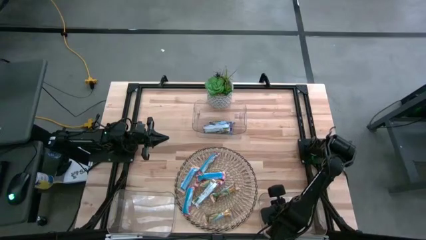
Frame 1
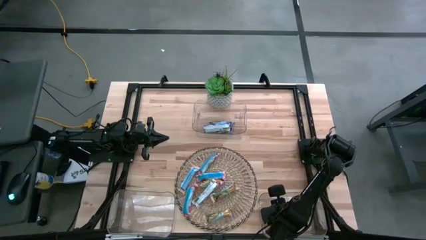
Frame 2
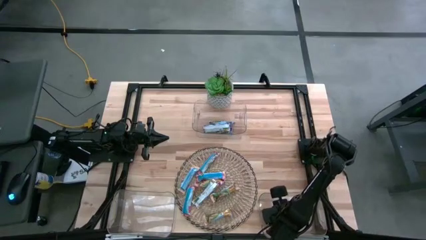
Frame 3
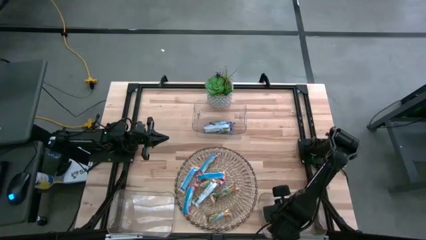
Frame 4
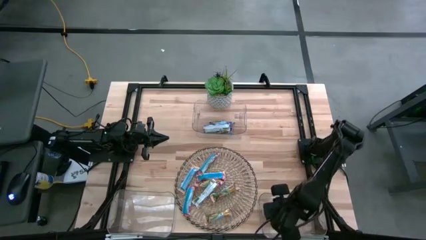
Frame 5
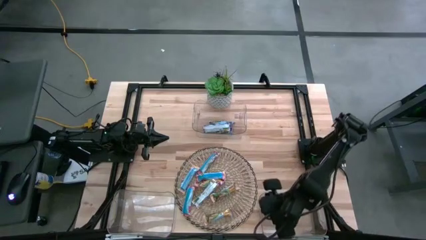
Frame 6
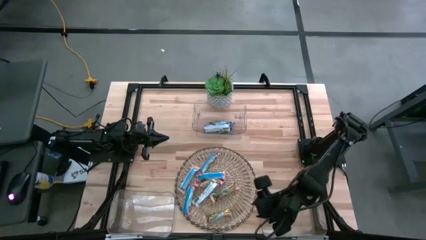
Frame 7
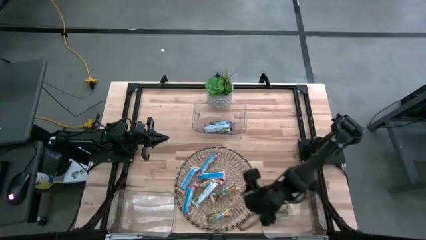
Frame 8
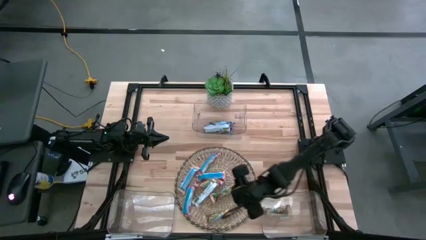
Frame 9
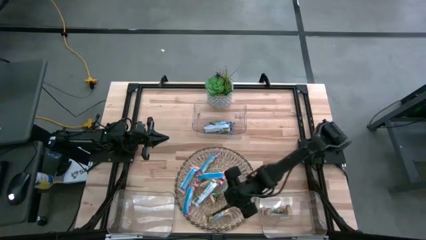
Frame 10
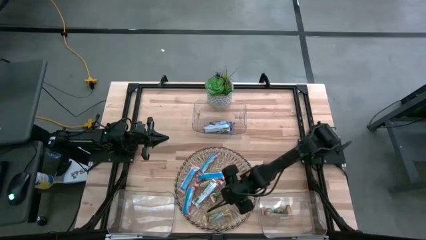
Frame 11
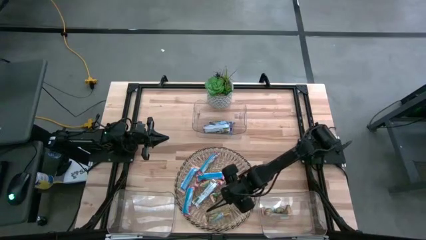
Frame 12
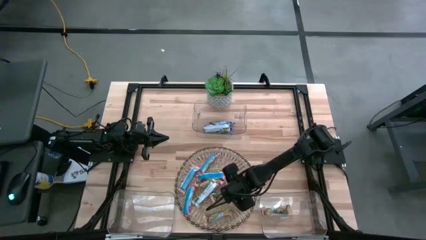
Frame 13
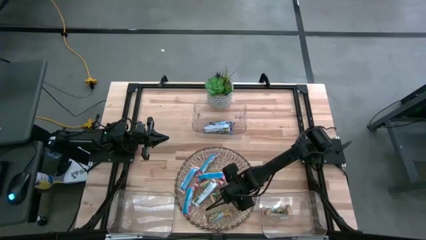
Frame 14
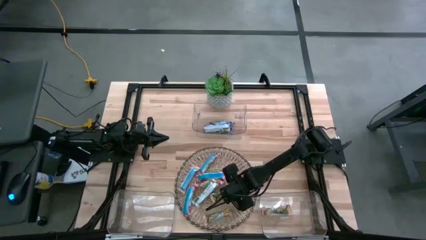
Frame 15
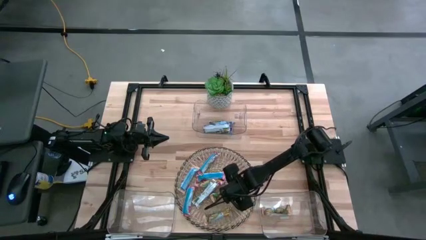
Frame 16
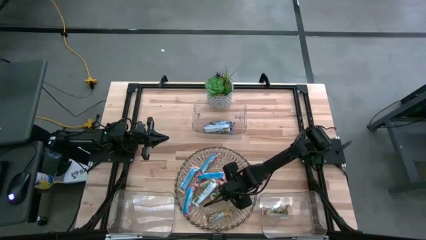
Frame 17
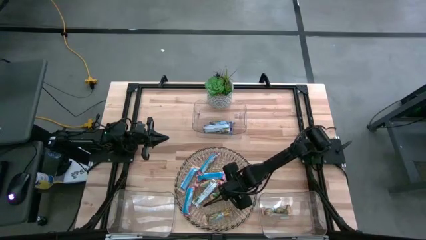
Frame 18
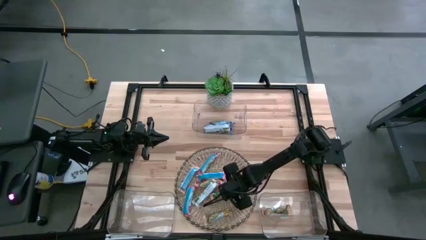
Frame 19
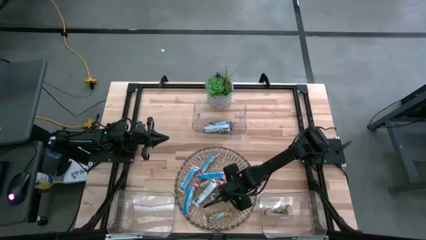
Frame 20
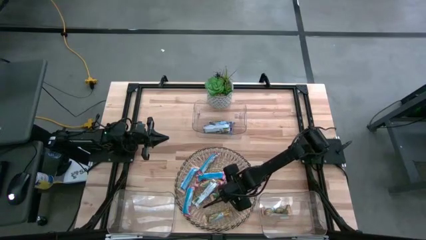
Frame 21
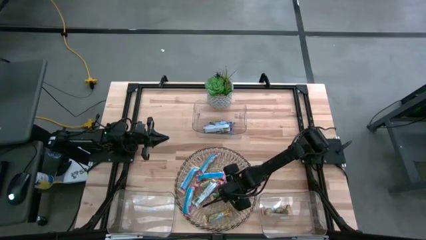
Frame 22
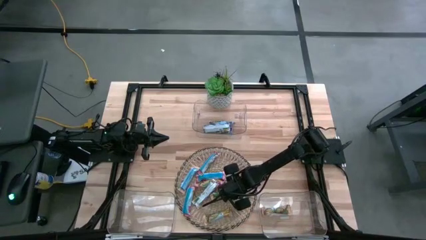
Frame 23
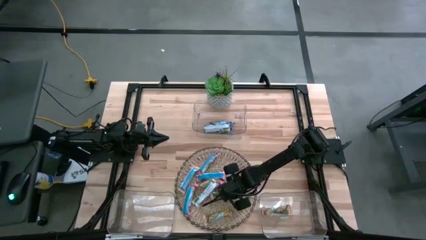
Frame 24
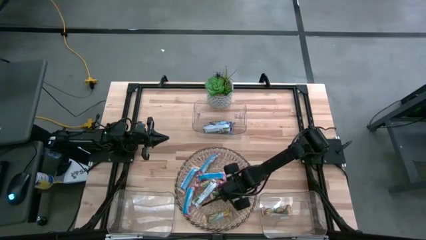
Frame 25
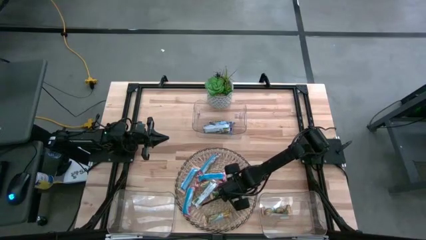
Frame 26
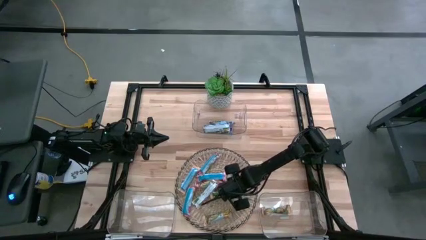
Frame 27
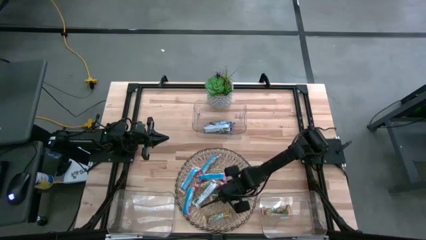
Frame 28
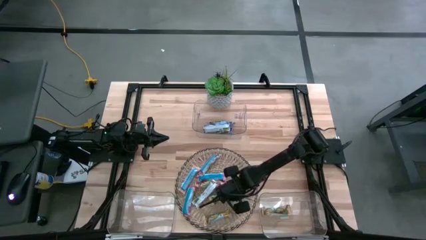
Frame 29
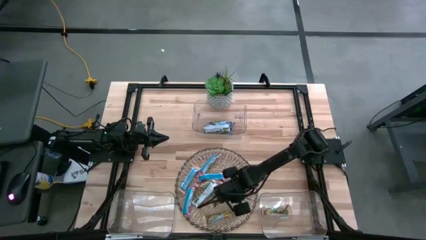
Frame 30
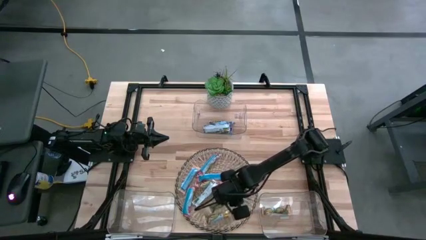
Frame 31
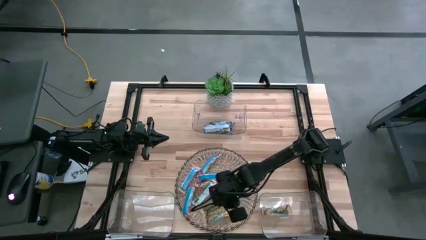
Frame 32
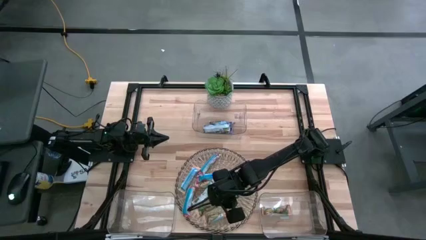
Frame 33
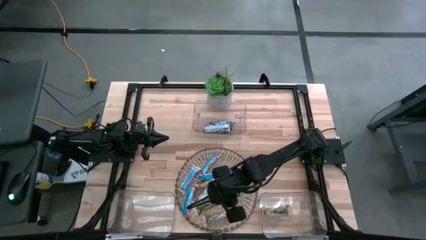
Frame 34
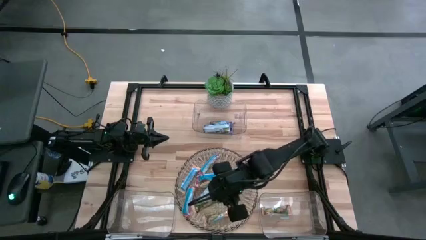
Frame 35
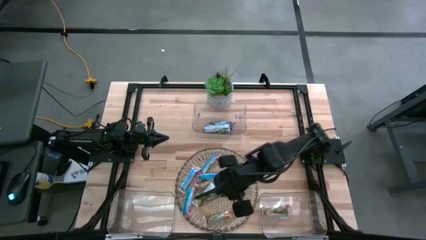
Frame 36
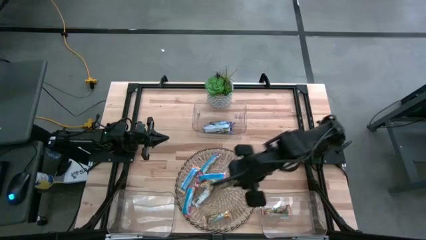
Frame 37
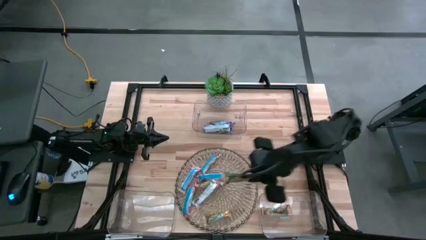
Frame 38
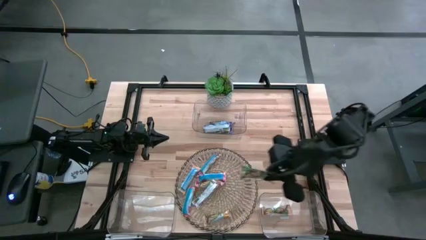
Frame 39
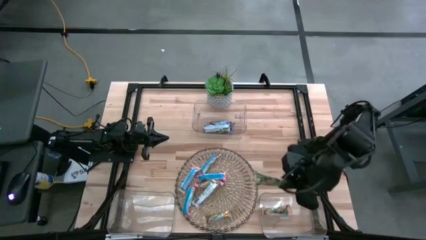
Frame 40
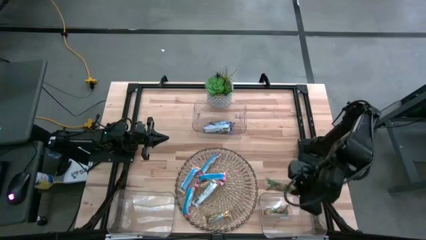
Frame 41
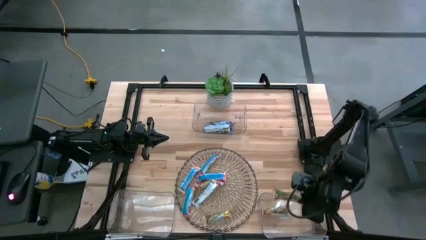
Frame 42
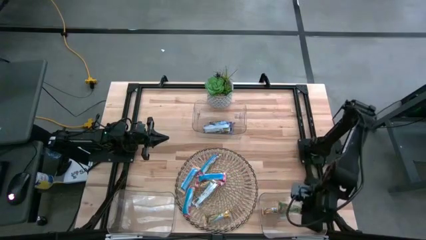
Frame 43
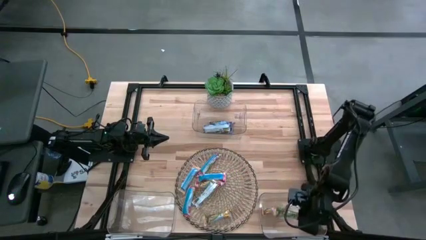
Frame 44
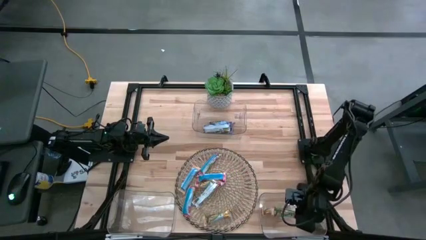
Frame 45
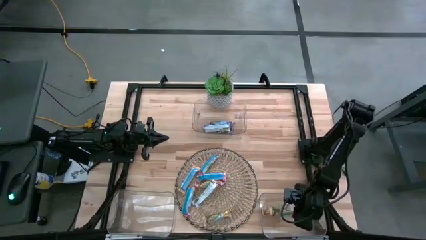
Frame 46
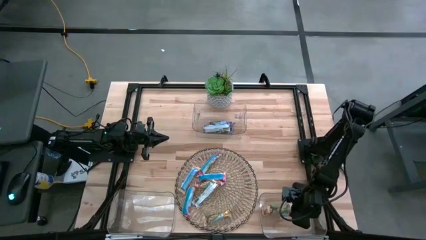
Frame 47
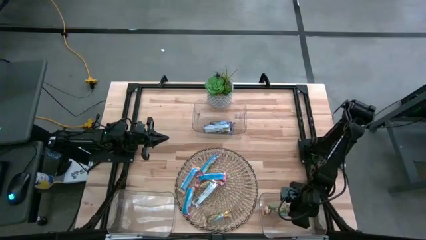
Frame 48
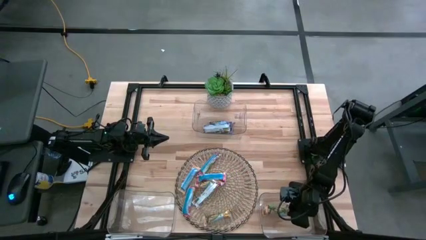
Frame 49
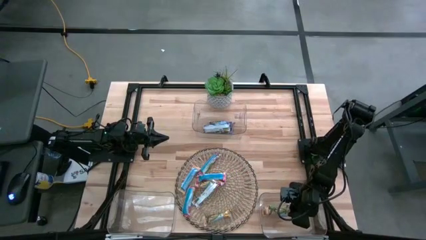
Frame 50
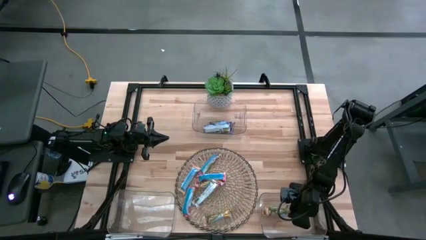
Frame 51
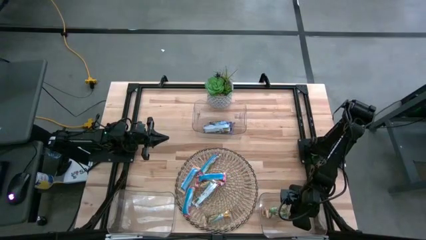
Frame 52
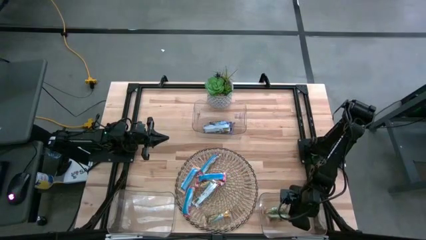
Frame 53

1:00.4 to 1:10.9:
Task: Pick and place Granola Bars by type
Put the yellow granola bar into the bottom right transparent bin

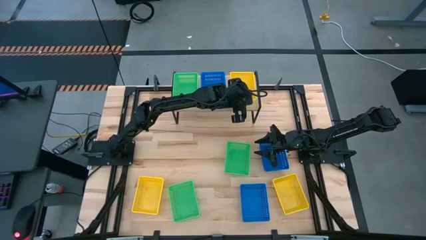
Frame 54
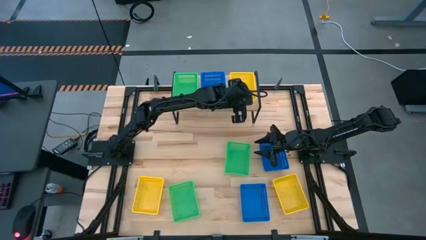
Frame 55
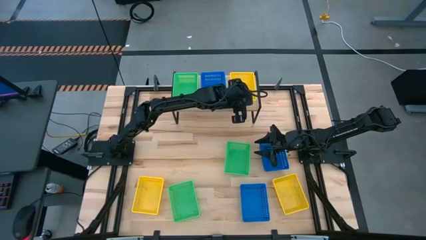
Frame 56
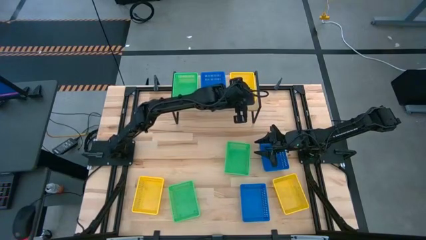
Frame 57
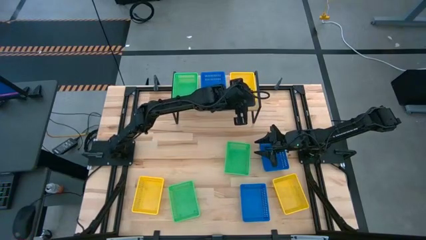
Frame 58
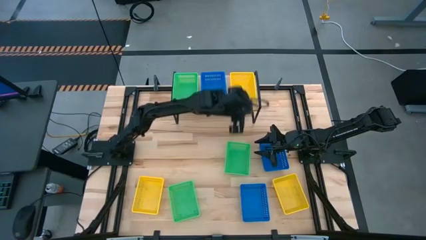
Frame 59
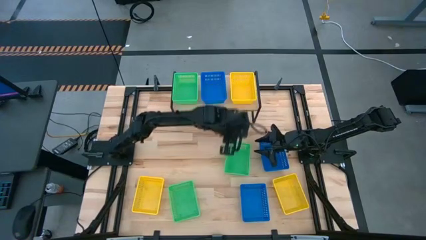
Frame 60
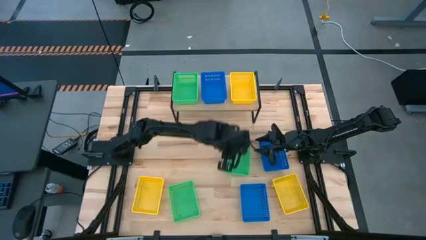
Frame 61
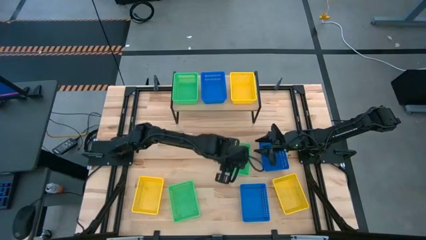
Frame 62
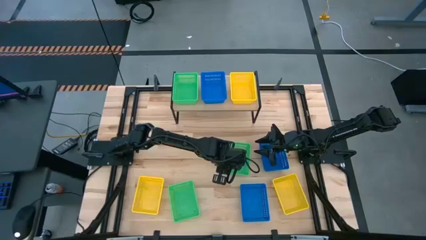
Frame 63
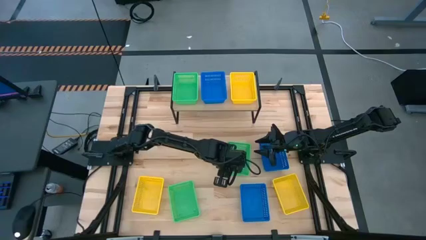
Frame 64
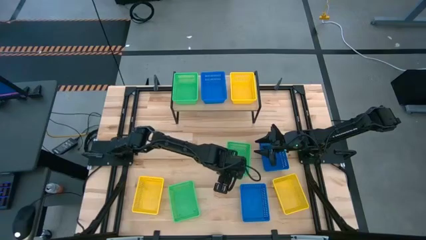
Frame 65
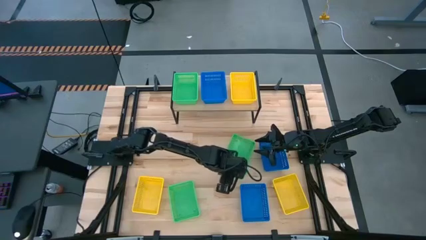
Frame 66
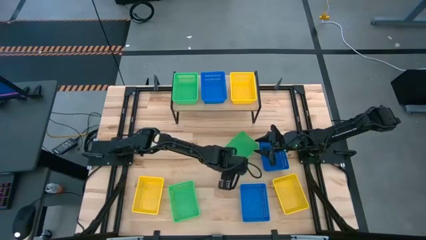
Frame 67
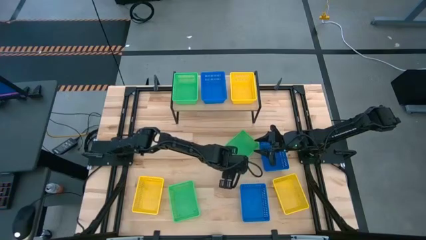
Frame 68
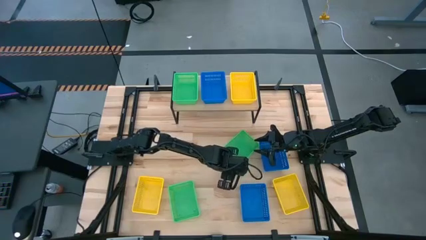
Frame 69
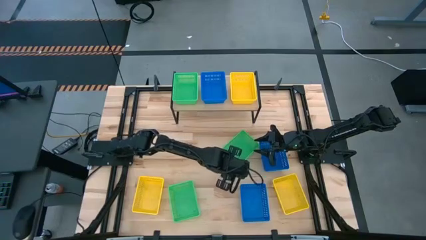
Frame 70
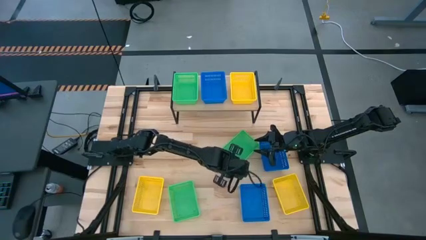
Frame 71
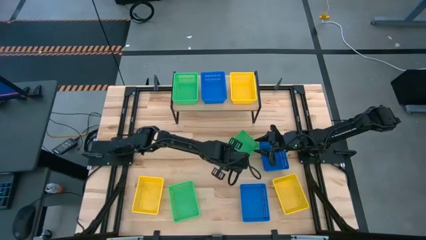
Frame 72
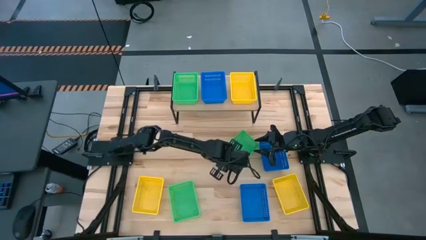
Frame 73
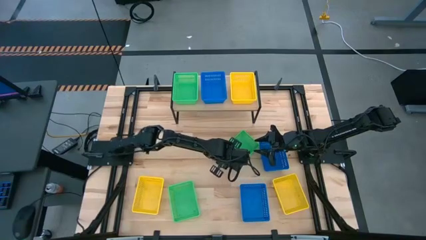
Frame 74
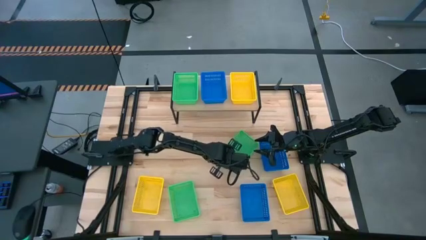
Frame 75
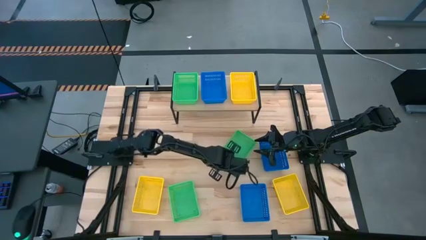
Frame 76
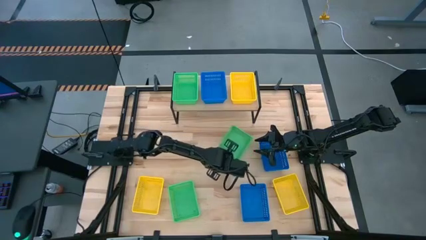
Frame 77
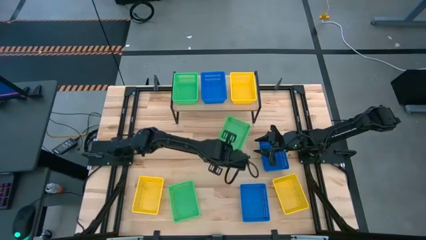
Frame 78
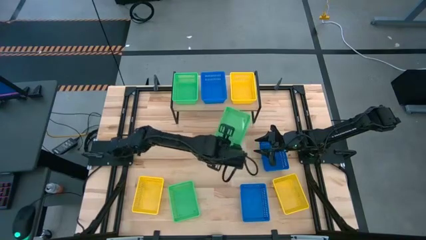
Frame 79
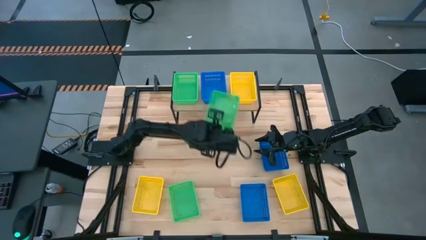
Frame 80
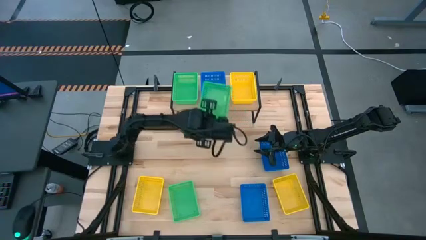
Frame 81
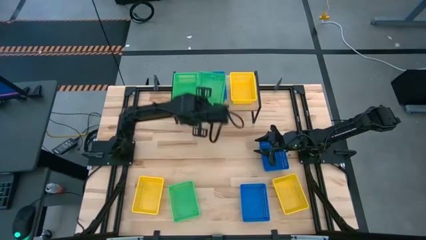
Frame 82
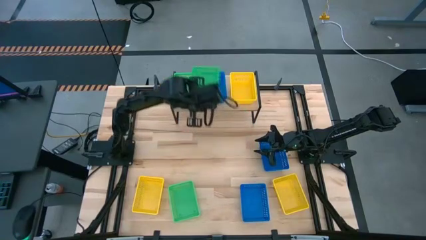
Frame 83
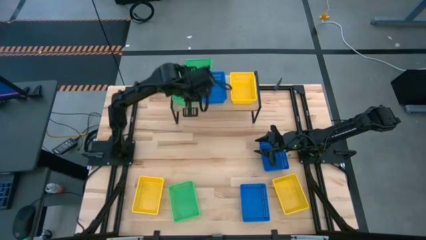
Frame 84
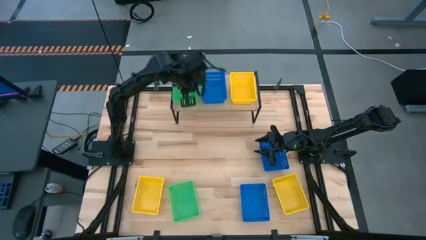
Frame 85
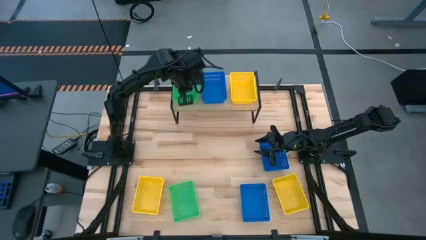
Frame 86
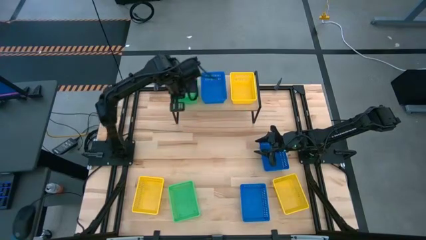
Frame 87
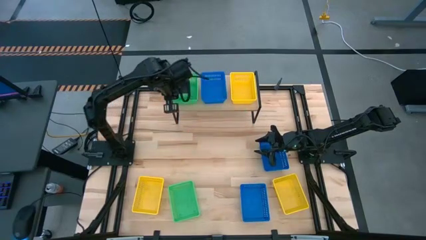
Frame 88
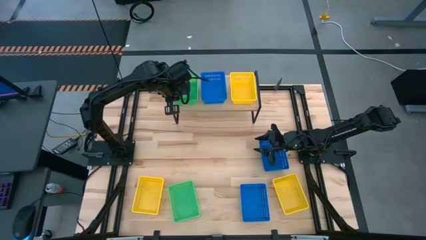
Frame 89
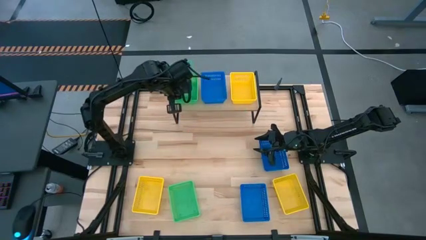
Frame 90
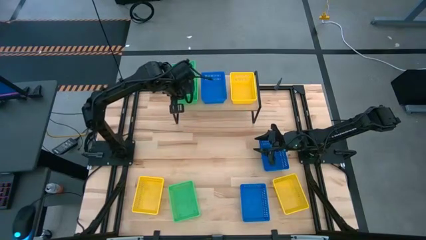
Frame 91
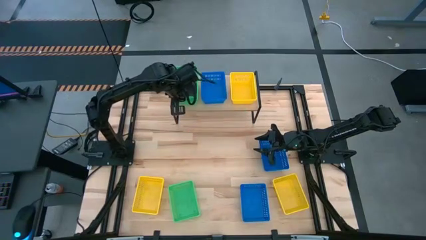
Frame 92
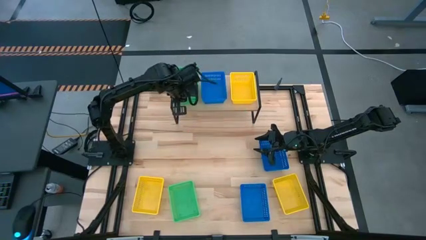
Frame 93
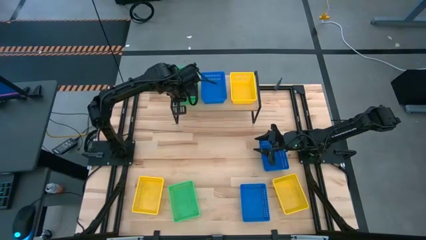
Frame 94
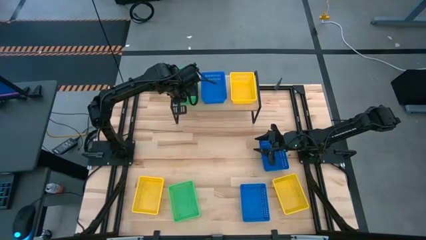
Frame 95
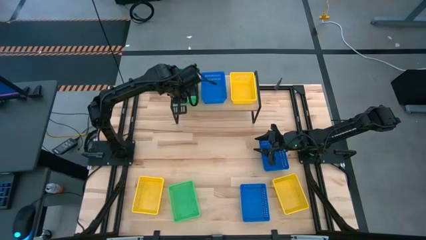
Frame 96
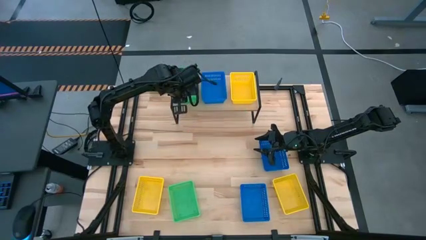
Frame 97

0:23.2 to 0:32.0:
Task: Stack baskets on shelf by color
Stack the top green bin on top of the green bin on the shelf
